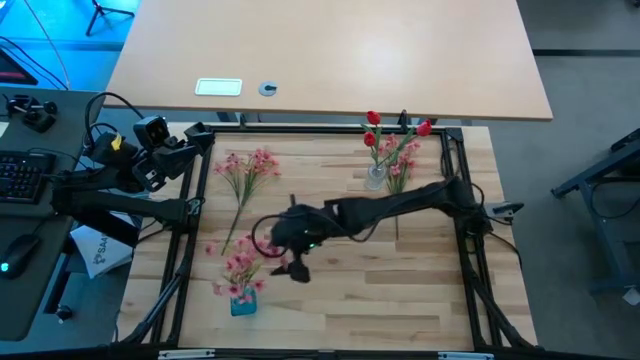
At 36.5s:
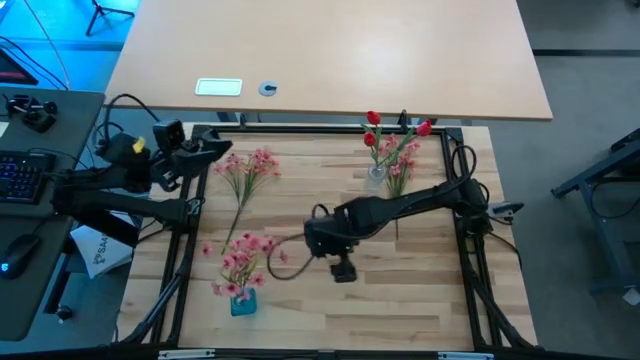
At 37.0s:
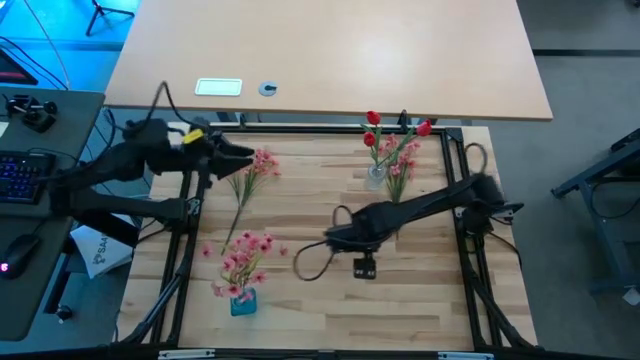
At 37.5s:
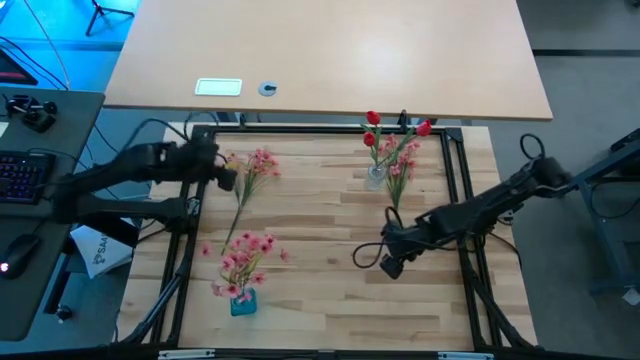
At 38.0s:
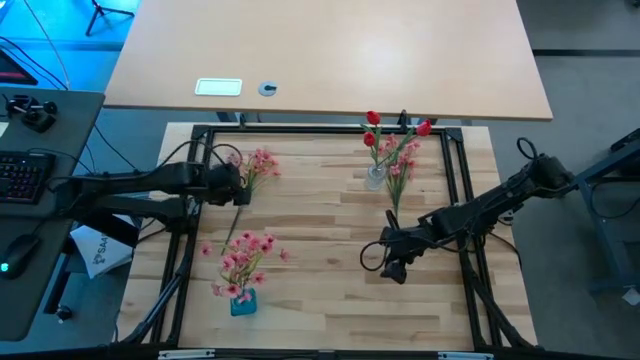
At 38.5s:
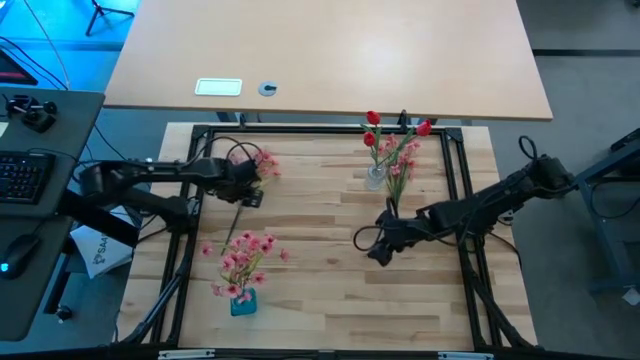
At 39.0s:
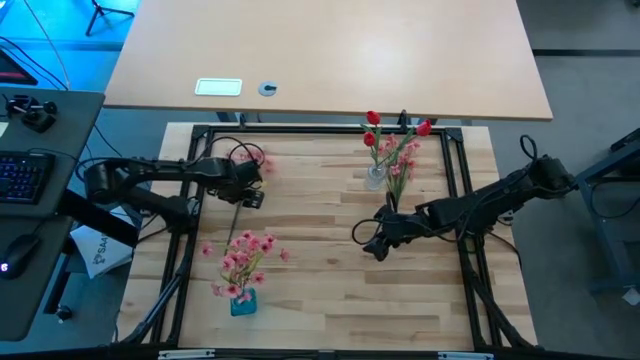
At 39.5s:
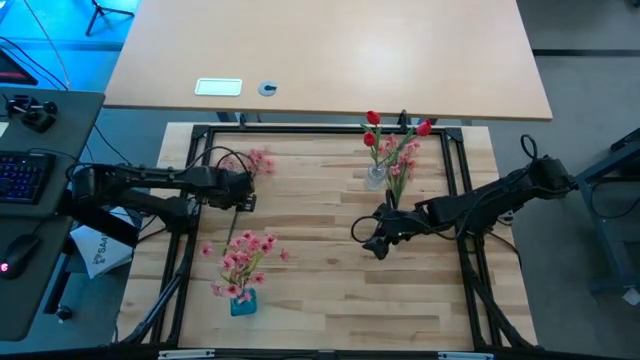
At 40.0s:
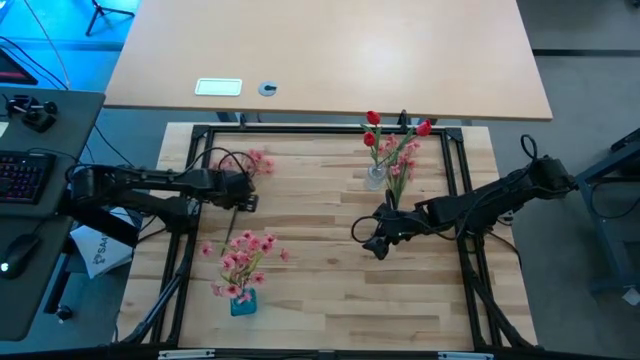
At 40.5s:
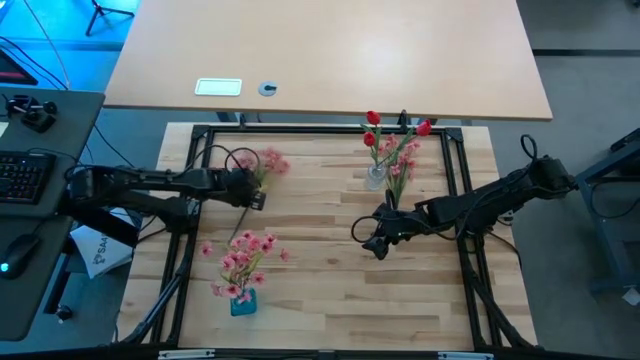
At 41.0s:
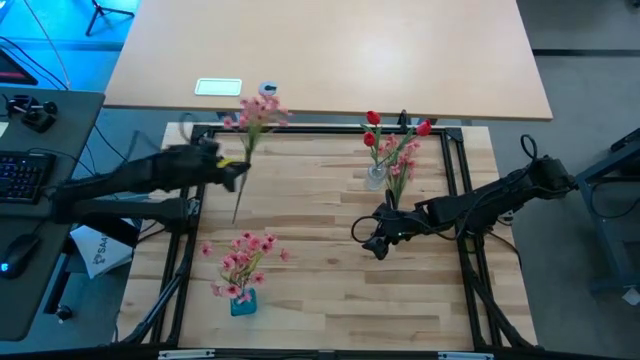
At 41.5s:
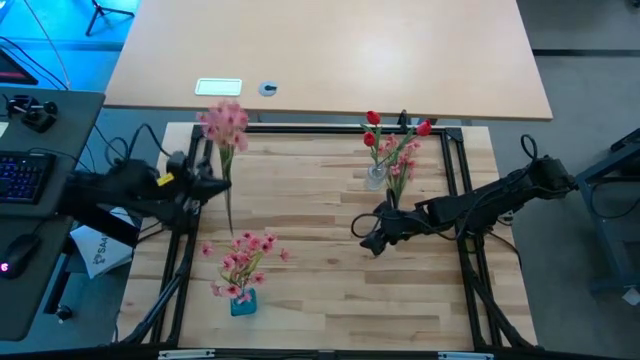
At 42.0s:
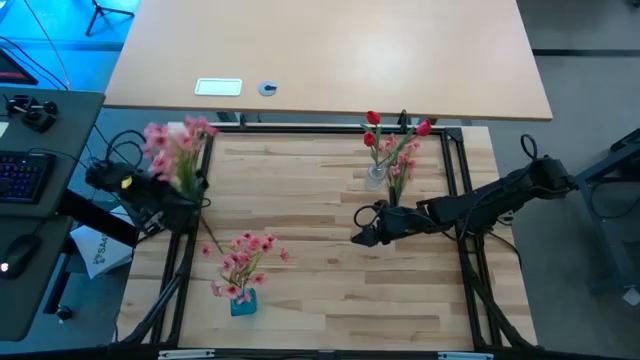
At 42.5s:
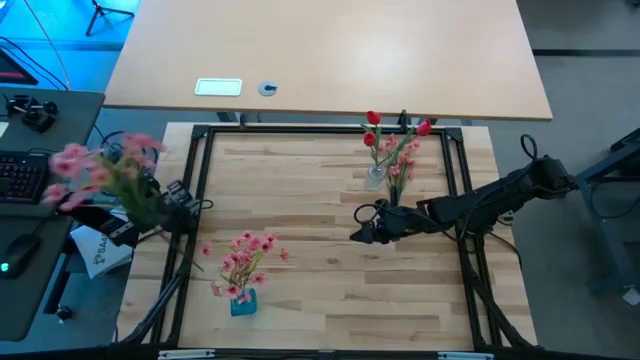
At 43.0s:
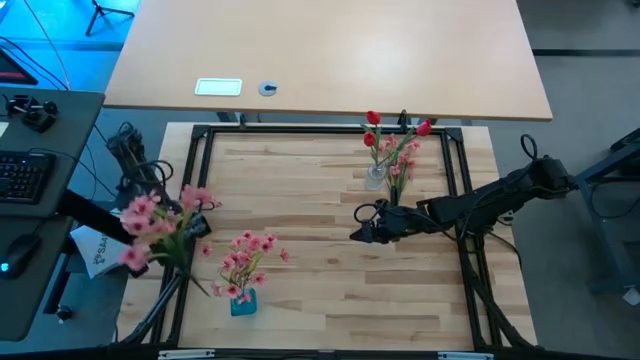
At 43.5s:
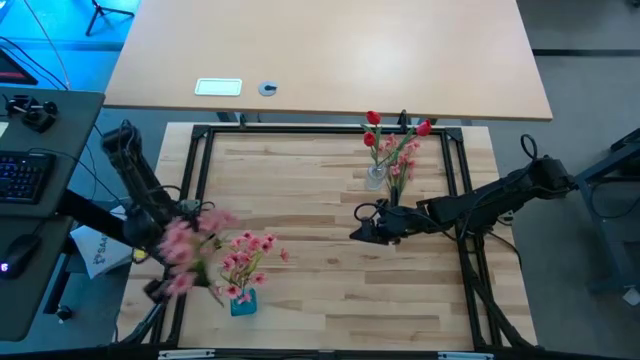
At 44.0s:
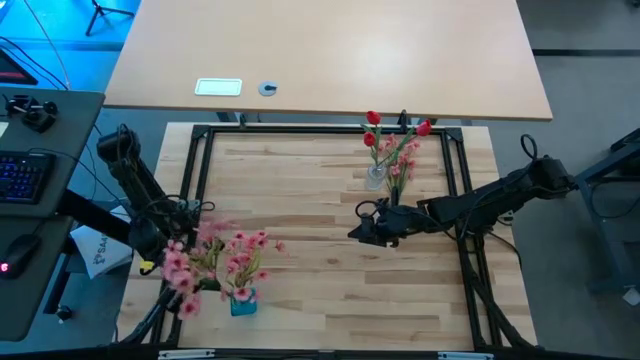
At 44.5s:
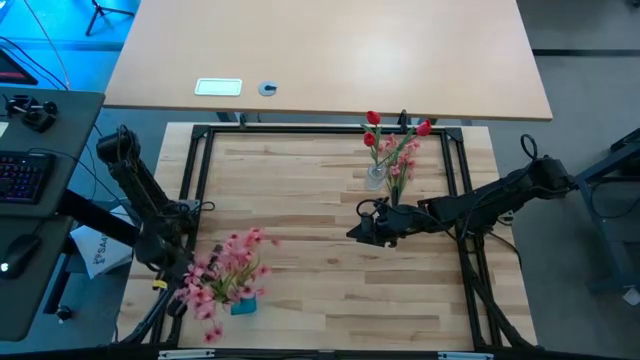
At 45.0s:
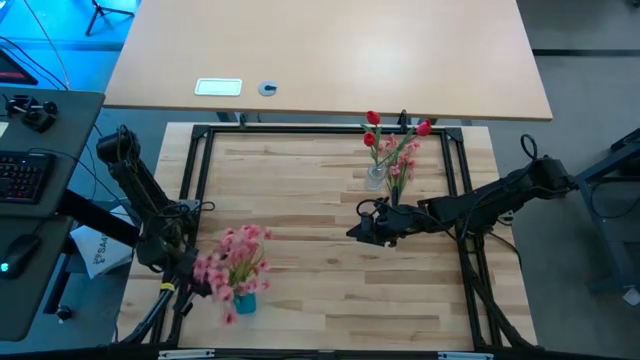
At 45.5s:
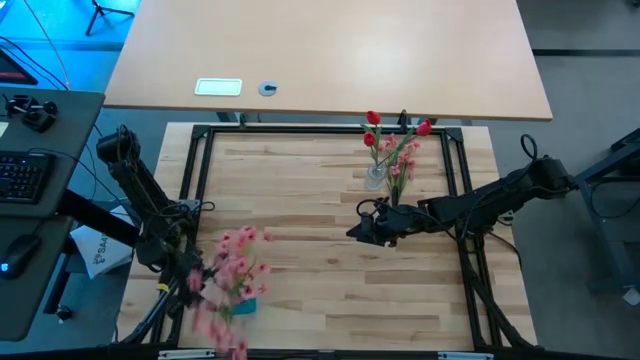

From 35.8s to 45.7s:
Task: Sort flowers into vase by color
Put the left pink flower into the blue vase

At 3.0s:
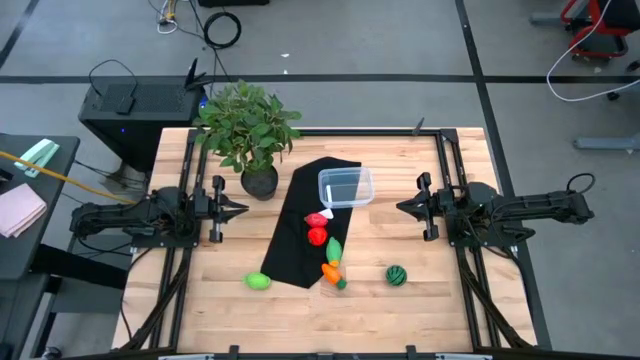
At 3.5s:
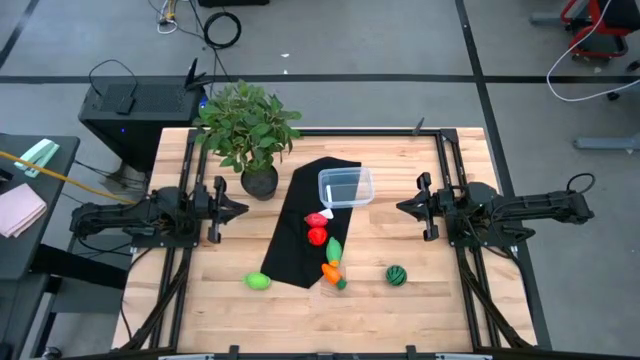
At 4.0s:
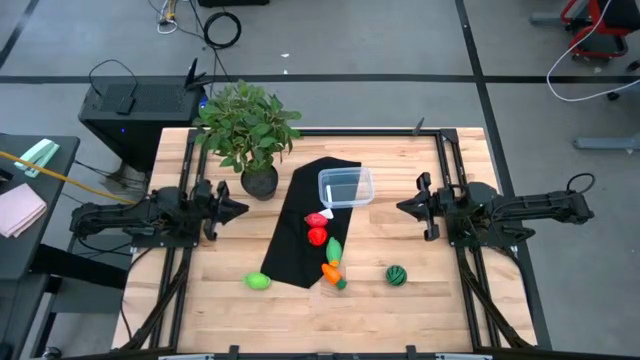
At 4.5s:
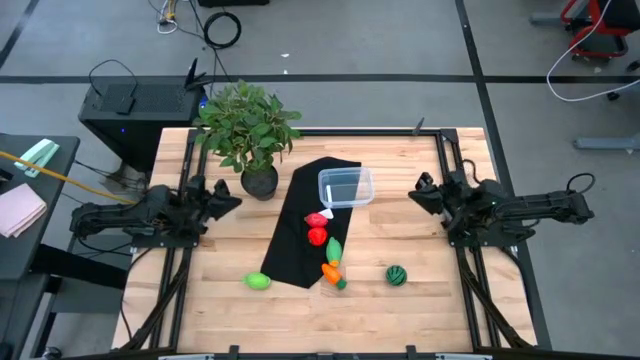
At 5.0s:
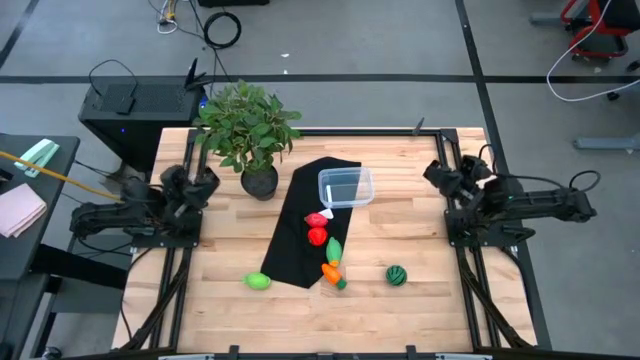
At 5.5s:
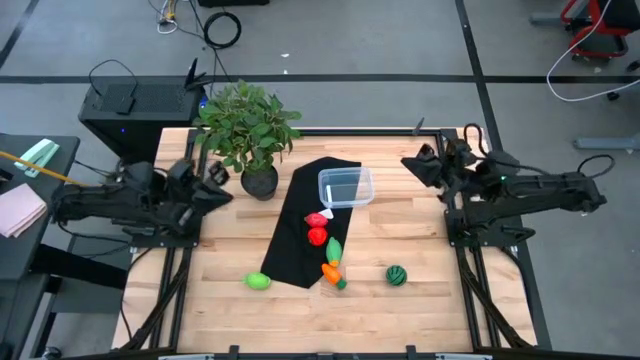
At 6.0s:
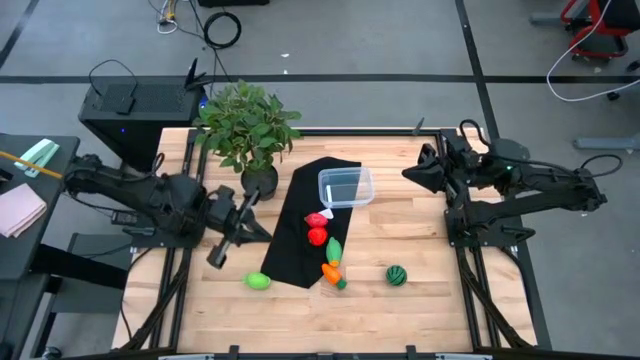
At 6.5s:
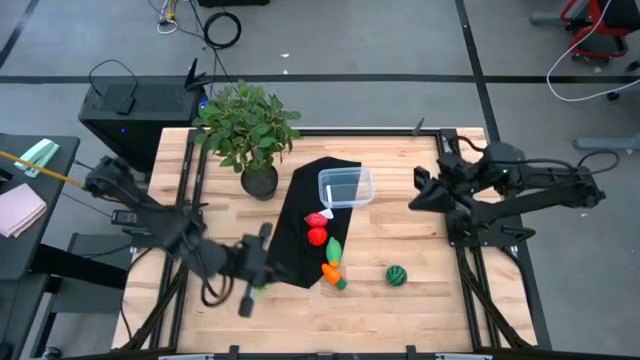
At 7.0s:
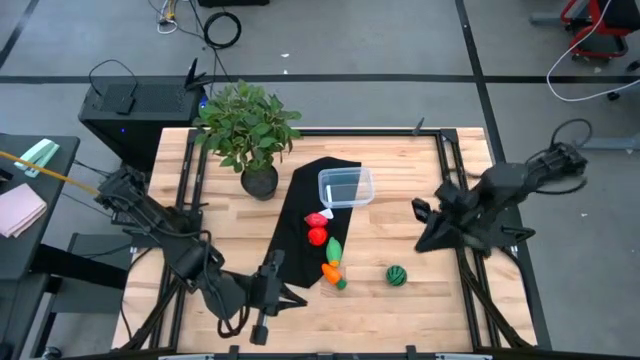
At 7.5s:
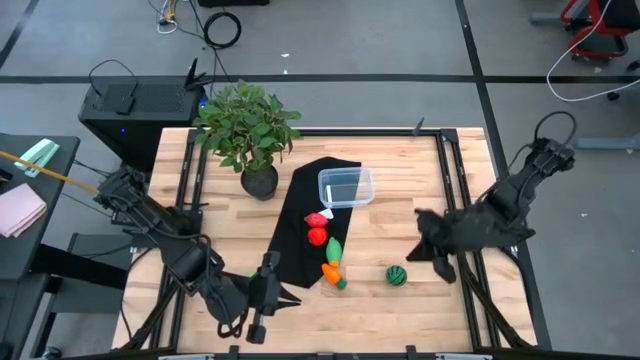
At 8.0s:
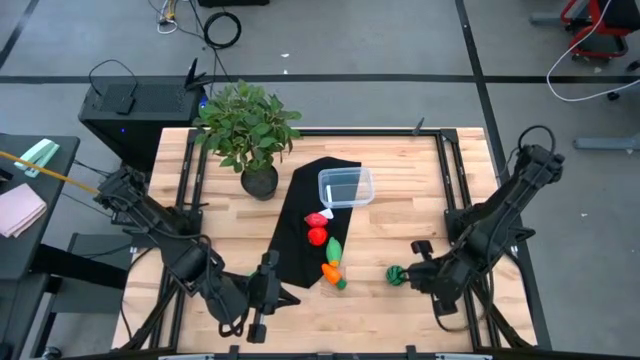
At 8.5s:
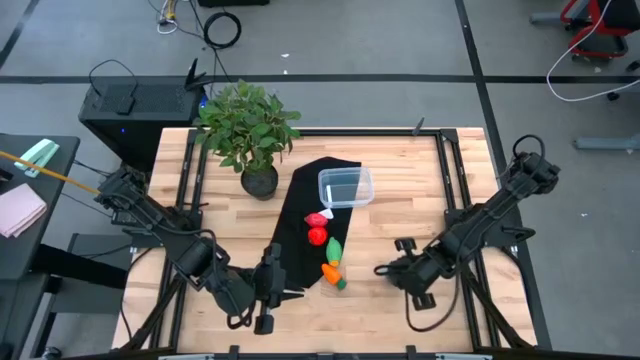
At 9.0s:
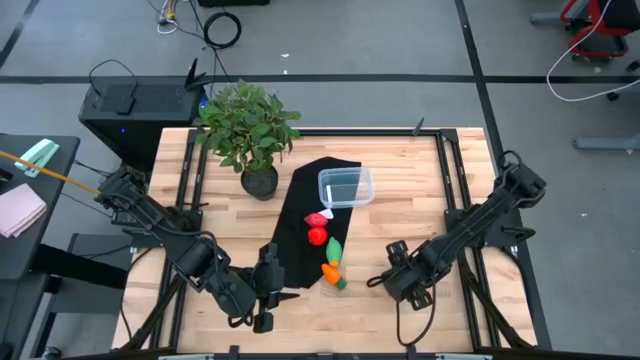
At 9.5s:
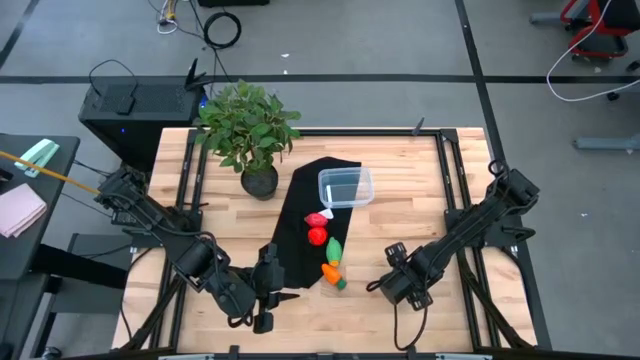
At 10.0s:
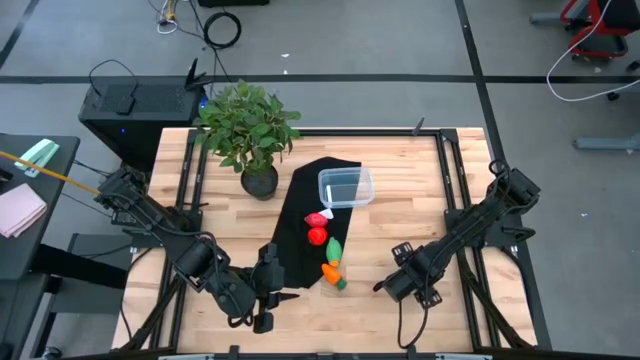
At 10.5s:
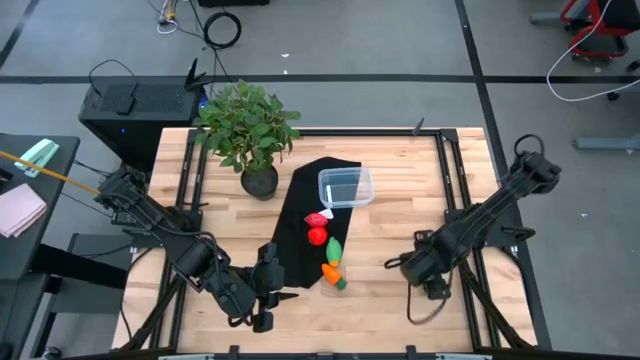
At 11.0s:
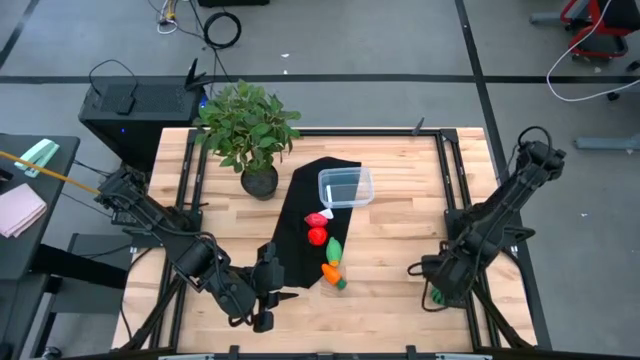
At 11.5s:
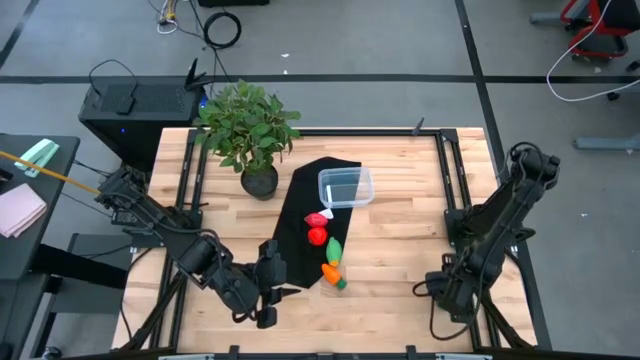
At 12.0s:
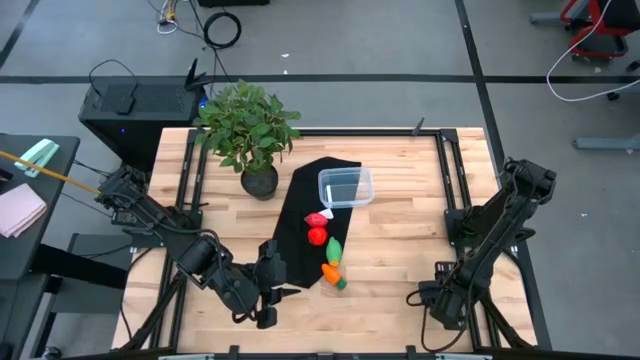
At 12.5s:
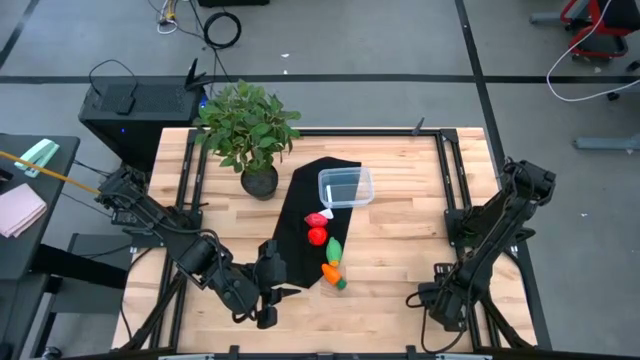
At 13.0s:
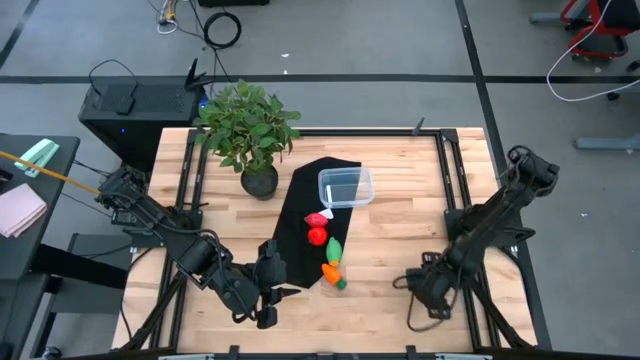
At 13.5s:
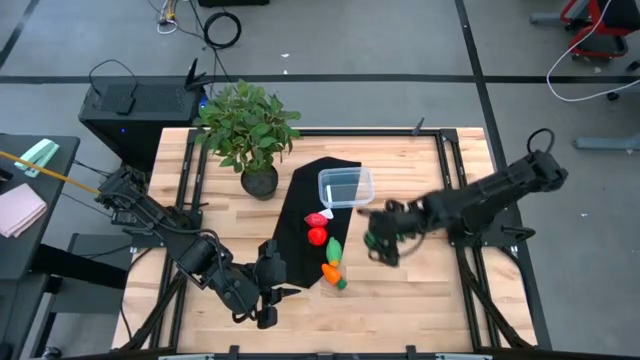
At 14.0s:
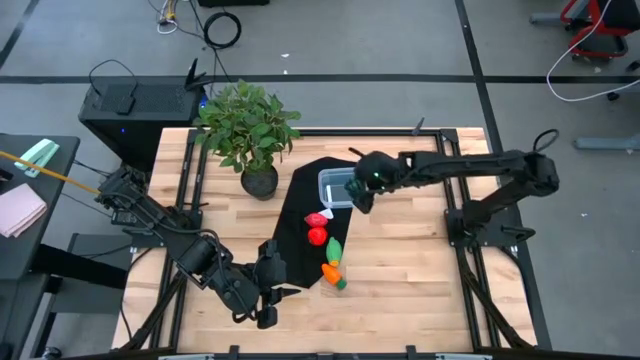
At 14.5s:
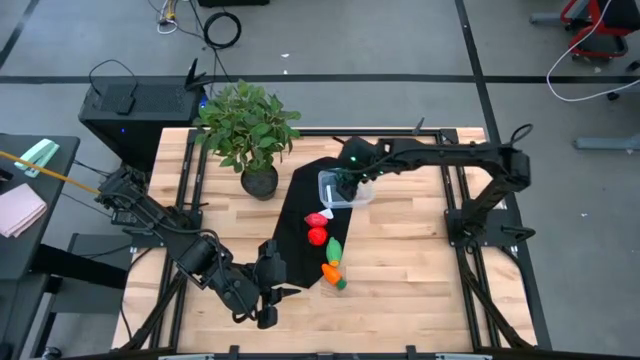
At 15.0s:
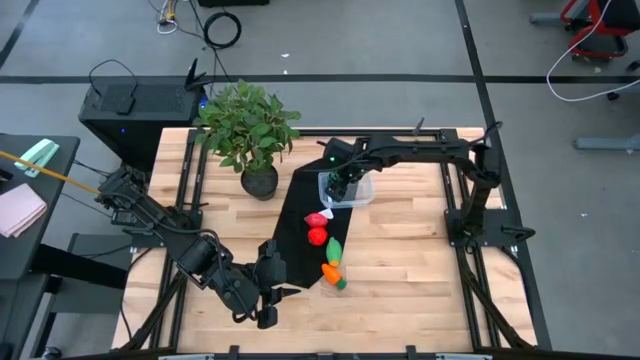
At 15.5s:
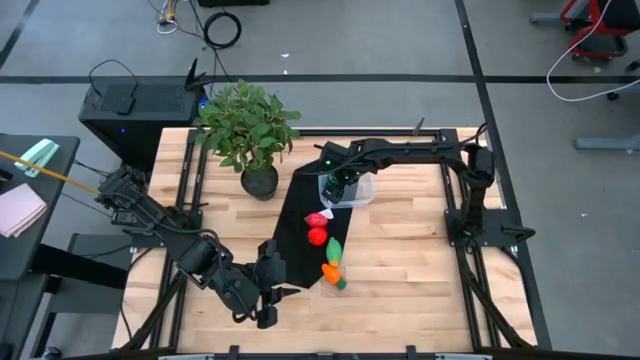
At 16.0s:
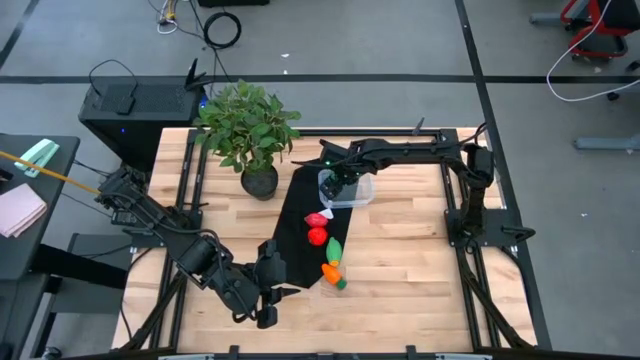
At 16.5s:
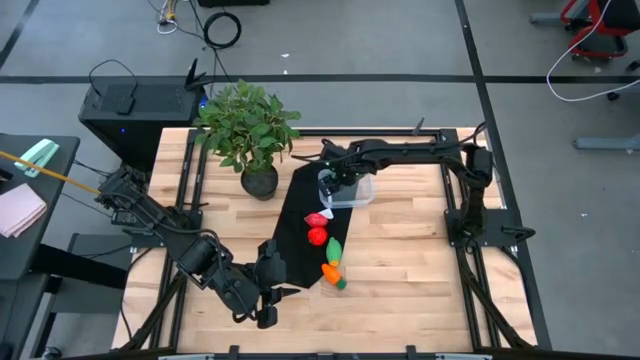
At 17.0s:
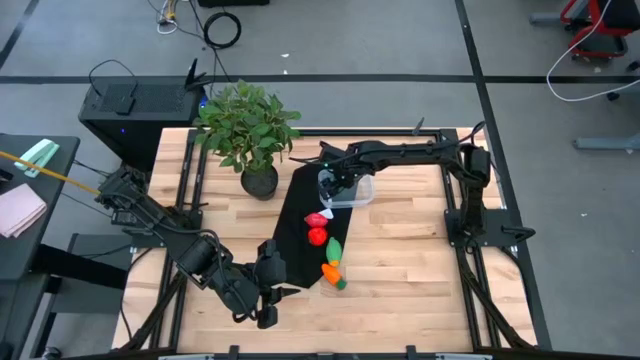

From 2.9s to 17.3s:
Task: Pick and placing Produce into tupperware
Put the watermelon into the transparent bin
